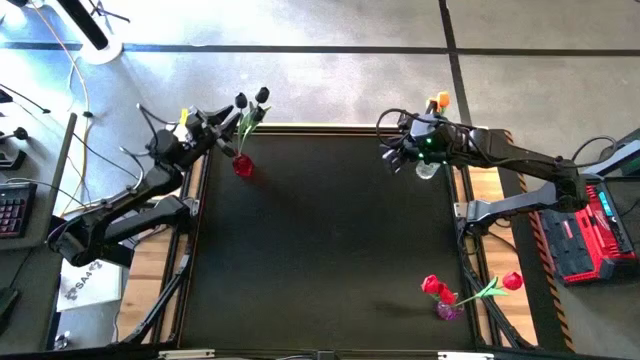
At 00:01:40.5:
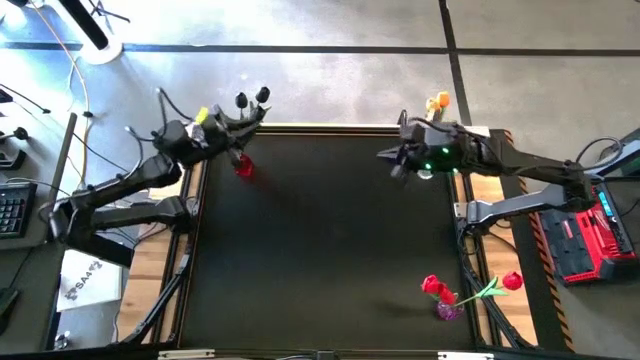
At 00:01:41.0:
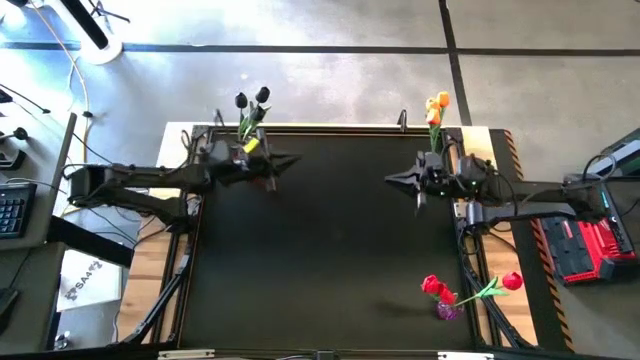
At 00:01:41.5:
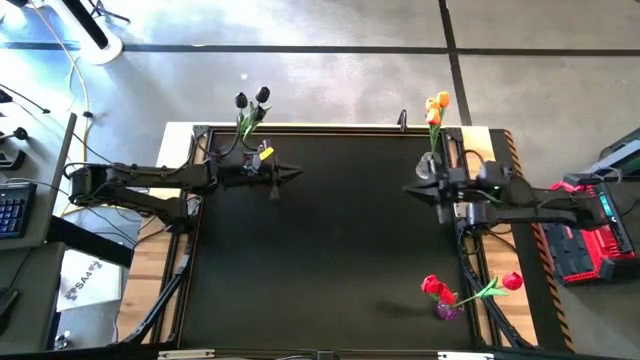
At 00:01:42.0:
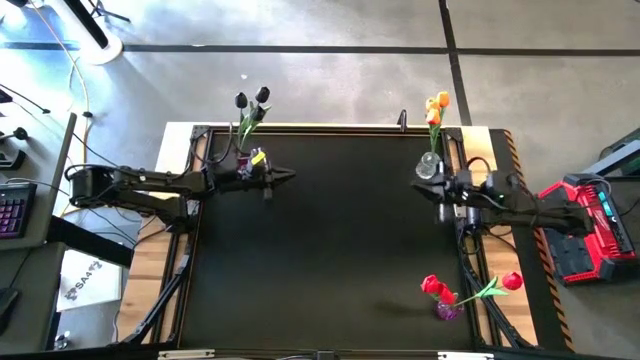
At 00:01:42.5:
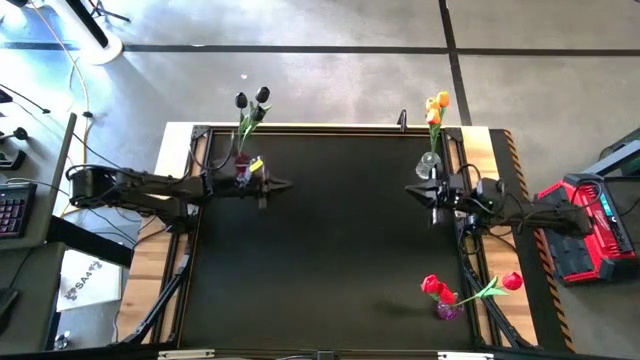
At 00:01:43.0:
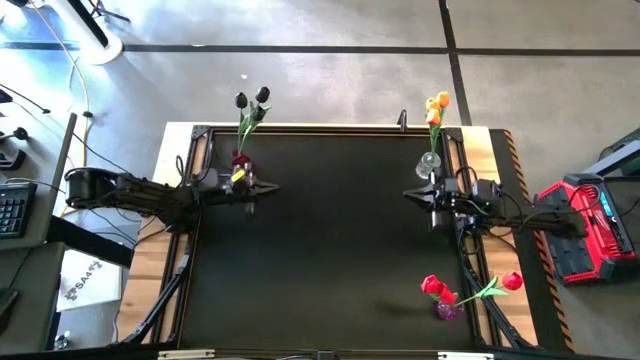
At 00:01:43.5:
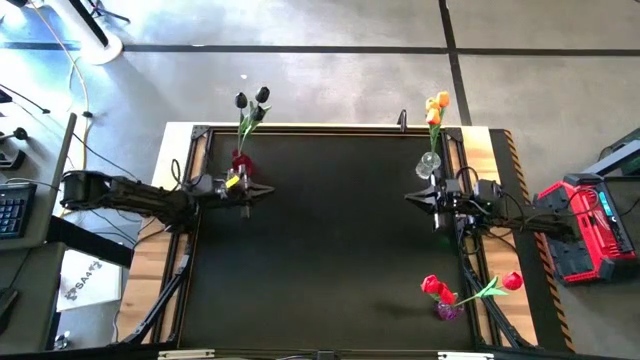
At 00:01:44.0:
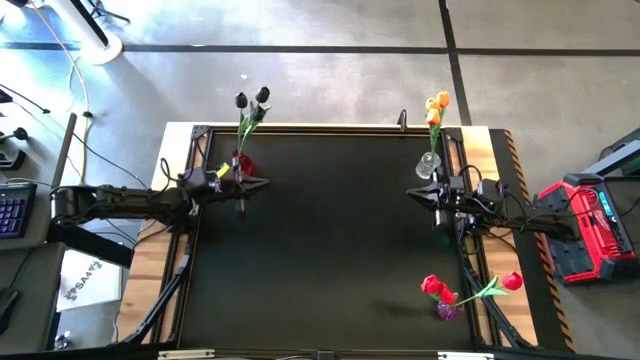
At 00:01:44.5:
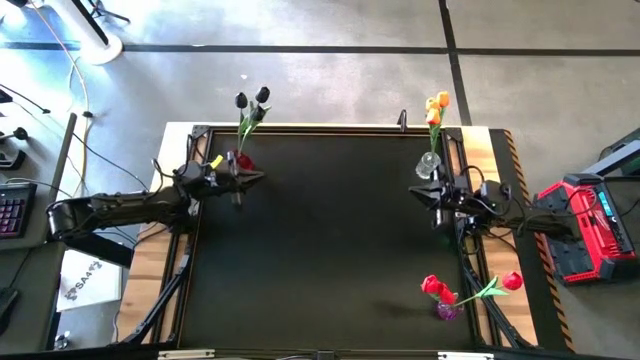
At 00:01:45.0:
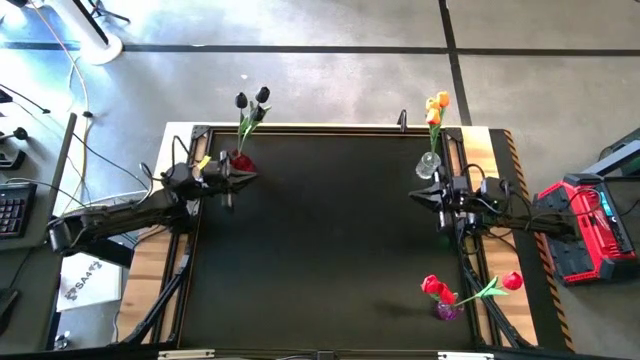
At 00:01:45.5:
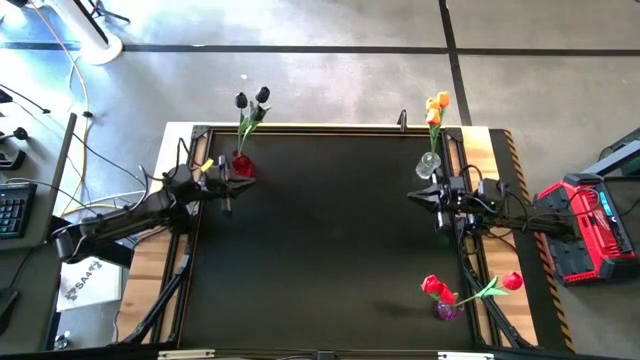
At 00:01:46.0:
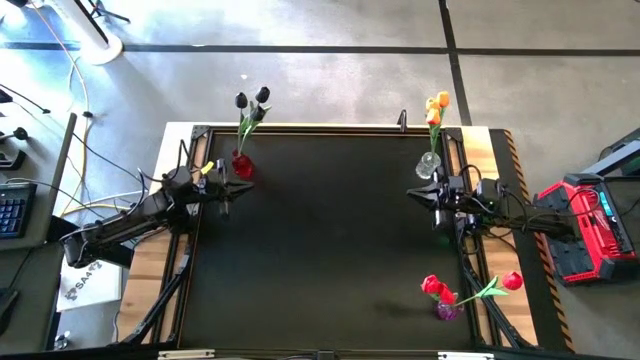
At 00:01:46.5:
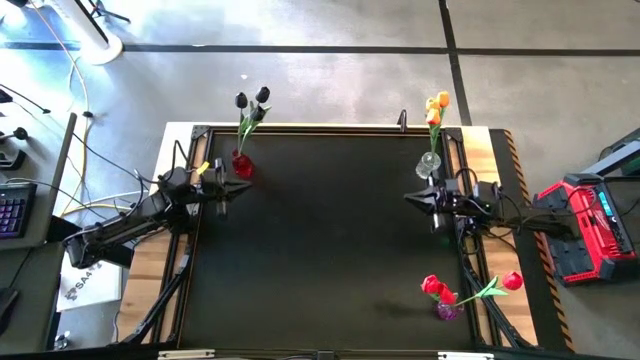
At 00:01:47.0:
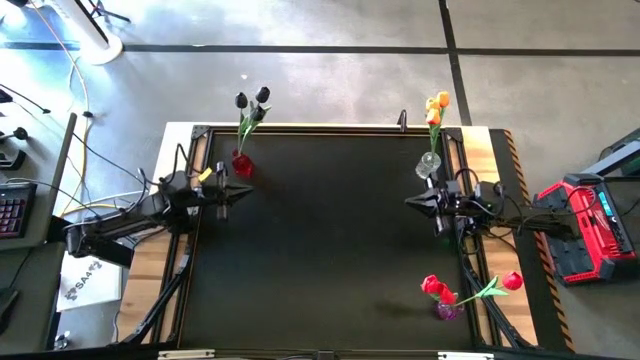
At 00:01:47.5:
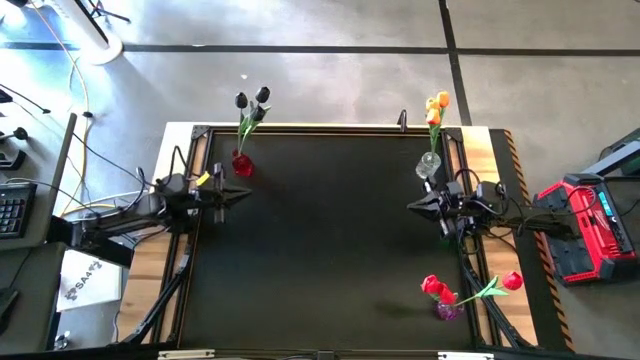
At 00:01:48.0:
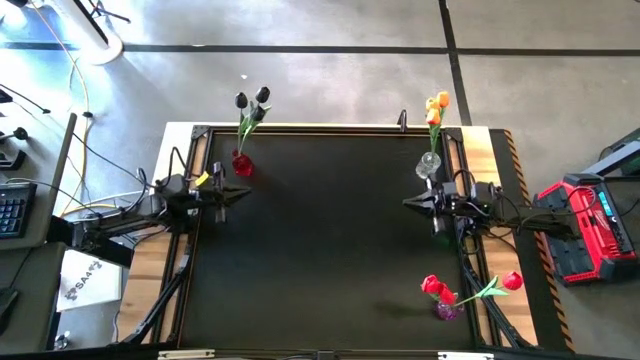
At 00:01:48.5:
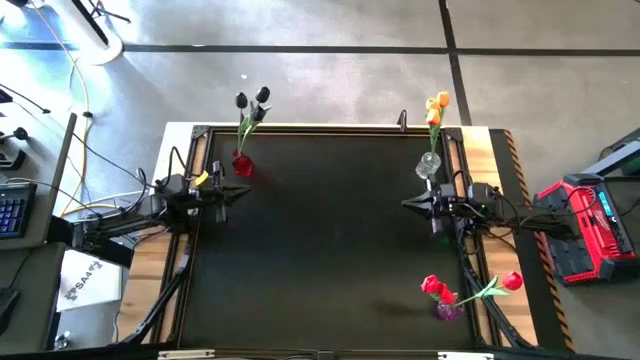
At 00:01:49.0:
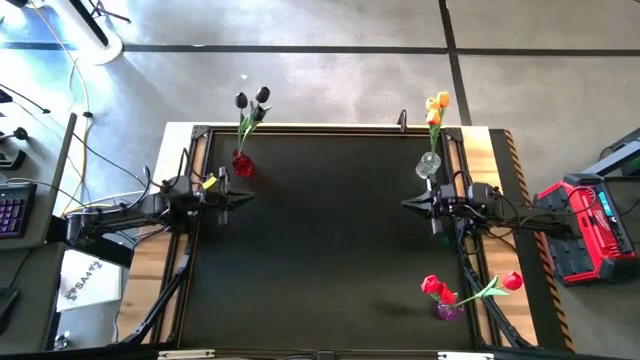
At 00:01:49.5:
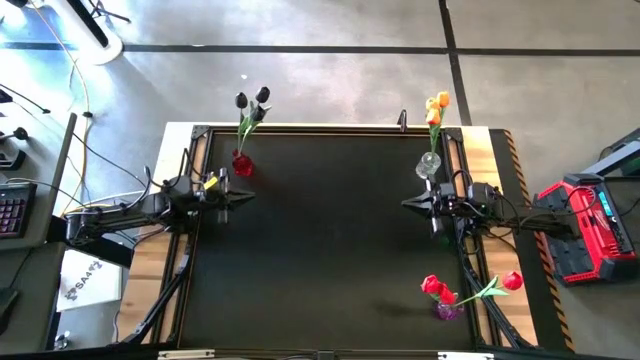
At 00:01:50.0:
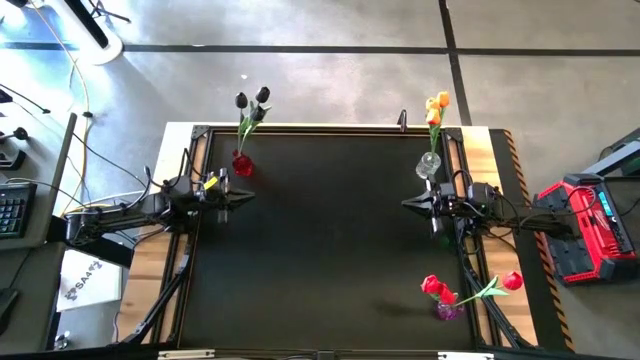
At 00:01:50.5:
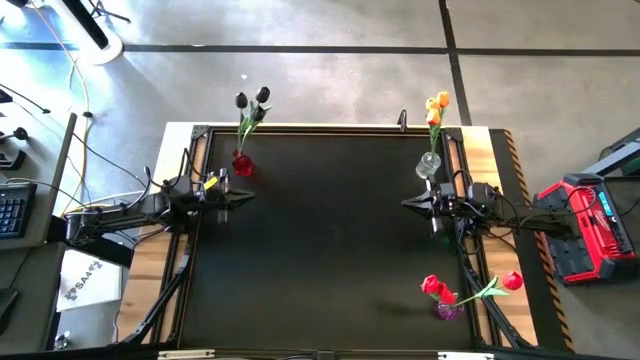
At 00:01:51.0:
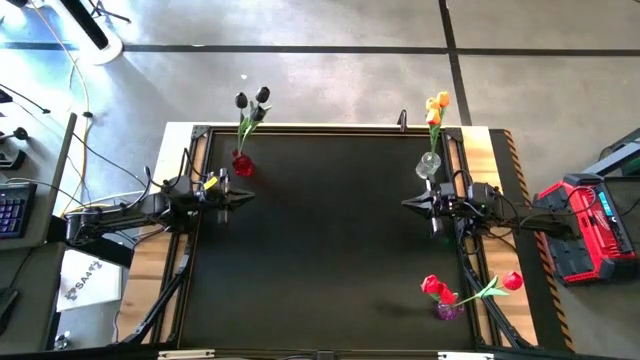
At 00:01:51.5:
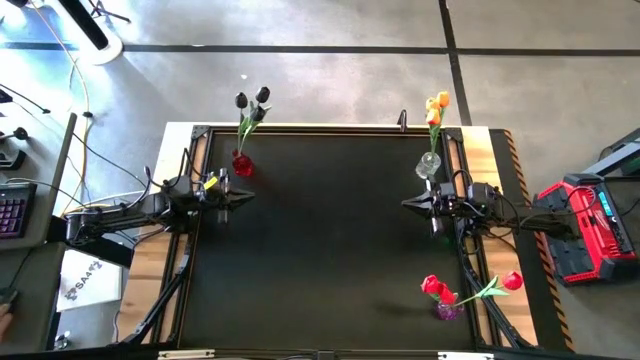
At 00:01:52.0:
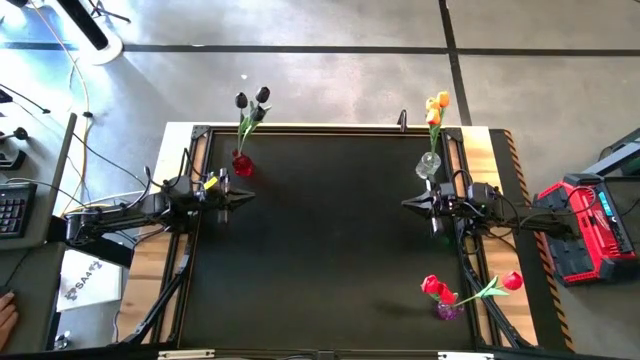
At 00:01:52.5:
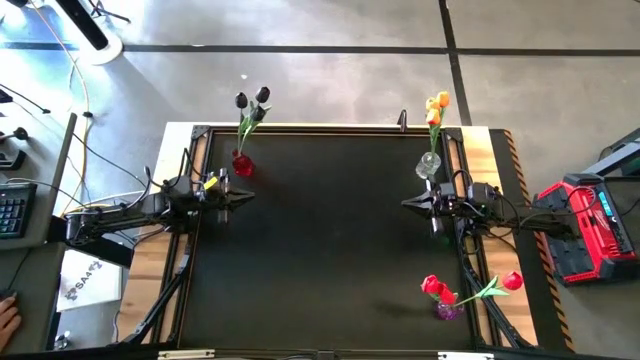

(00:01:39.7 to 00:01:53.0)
Task: Sort flowers into vase by color
Return to Home Position

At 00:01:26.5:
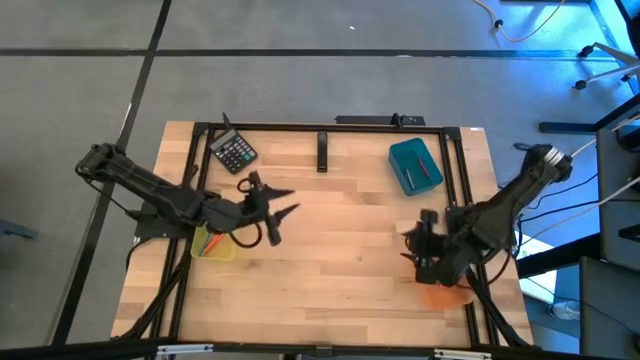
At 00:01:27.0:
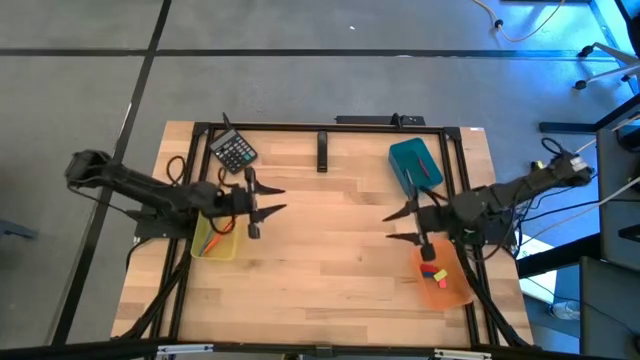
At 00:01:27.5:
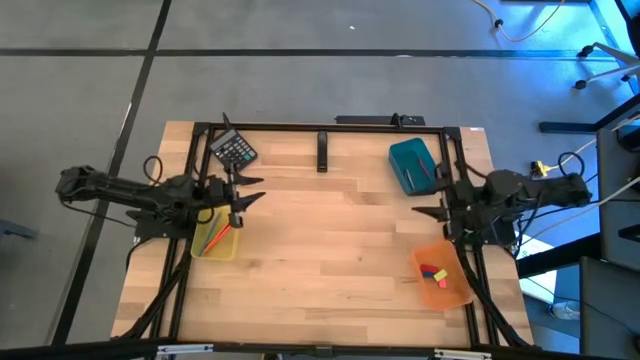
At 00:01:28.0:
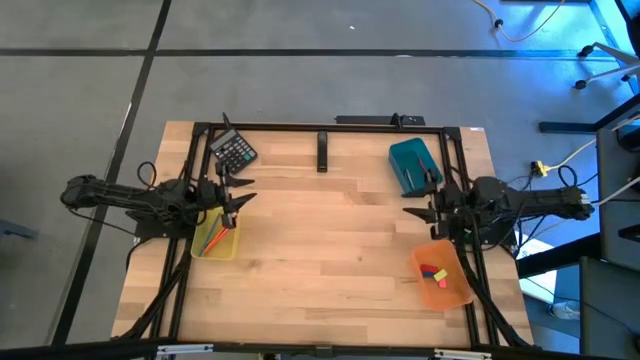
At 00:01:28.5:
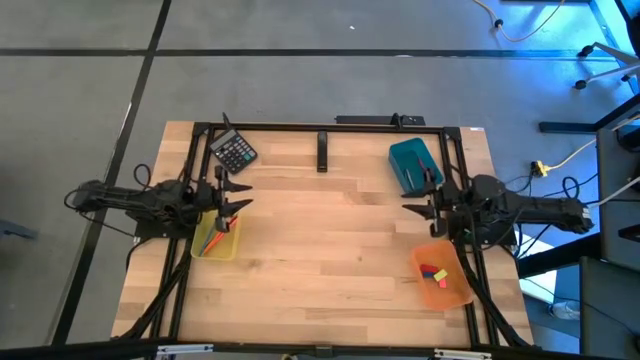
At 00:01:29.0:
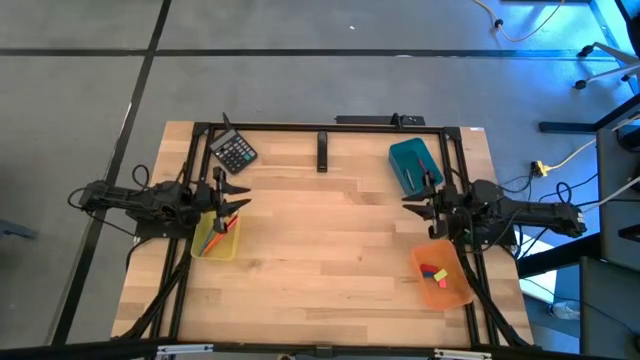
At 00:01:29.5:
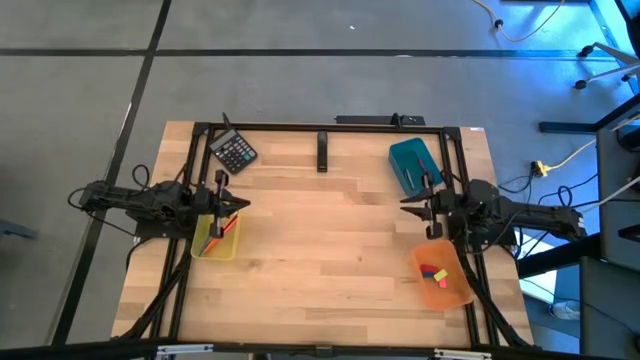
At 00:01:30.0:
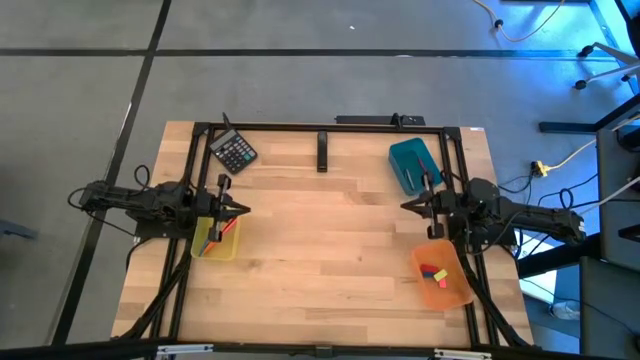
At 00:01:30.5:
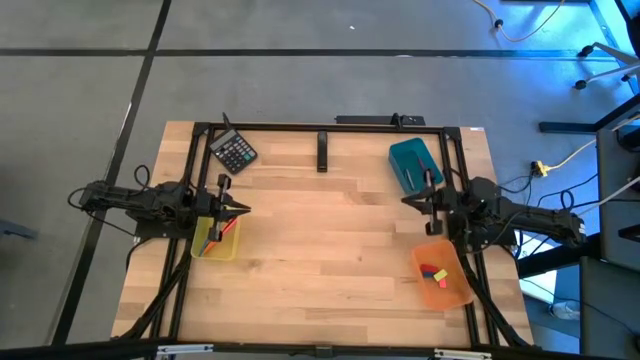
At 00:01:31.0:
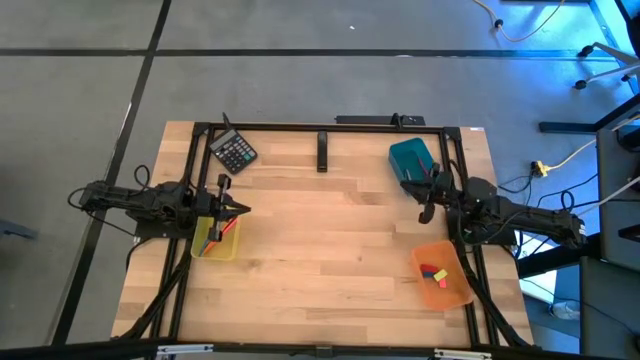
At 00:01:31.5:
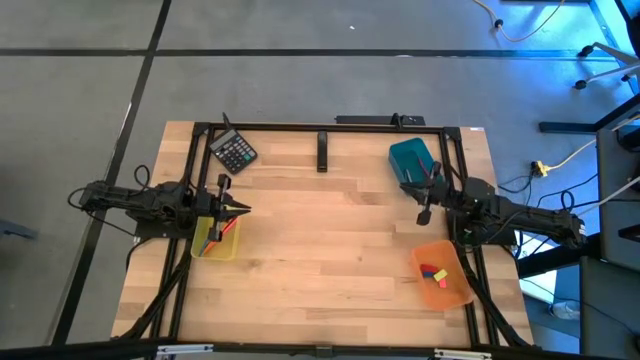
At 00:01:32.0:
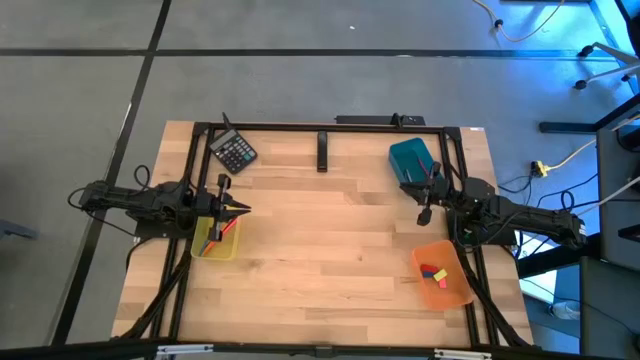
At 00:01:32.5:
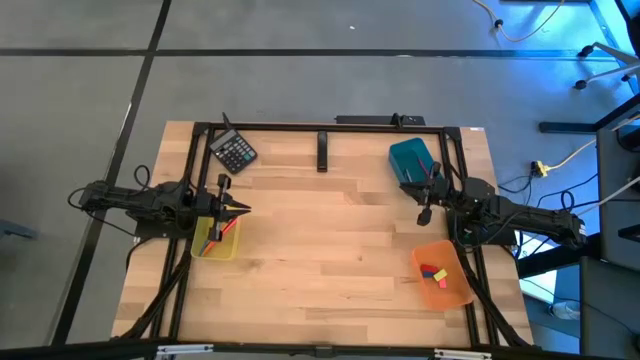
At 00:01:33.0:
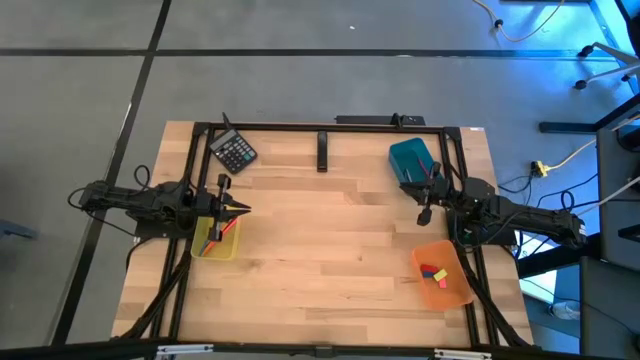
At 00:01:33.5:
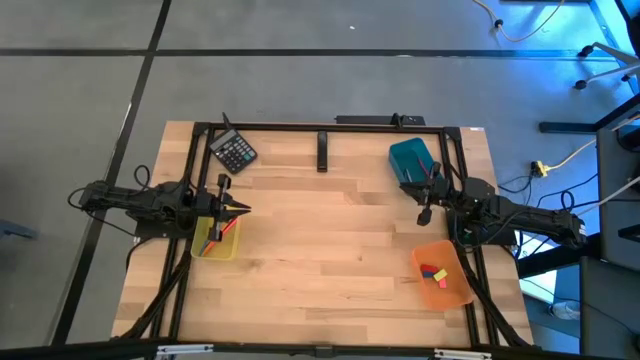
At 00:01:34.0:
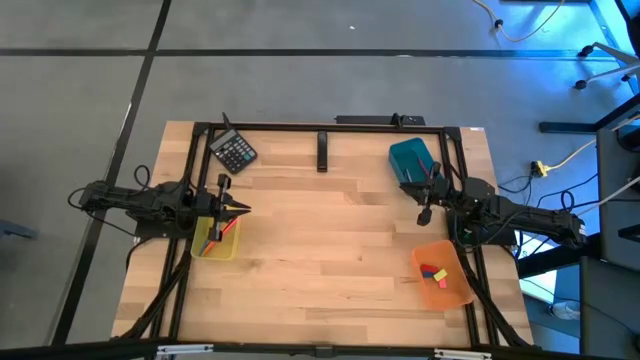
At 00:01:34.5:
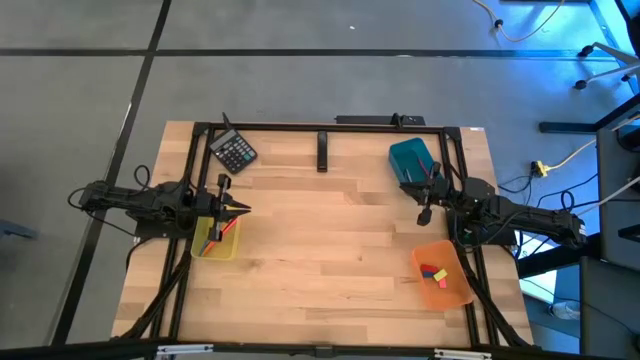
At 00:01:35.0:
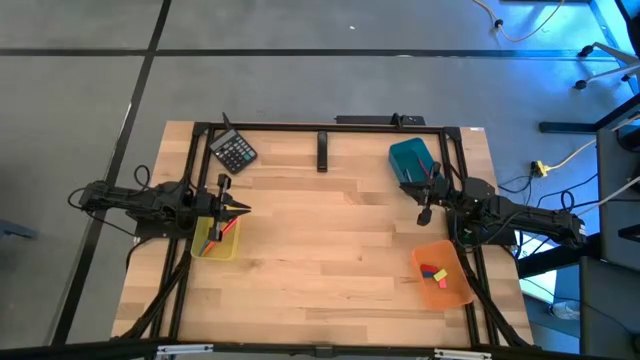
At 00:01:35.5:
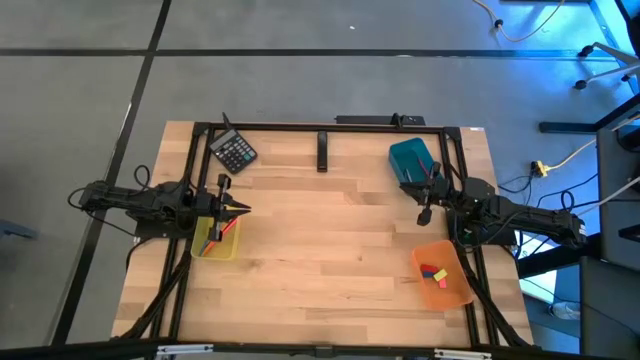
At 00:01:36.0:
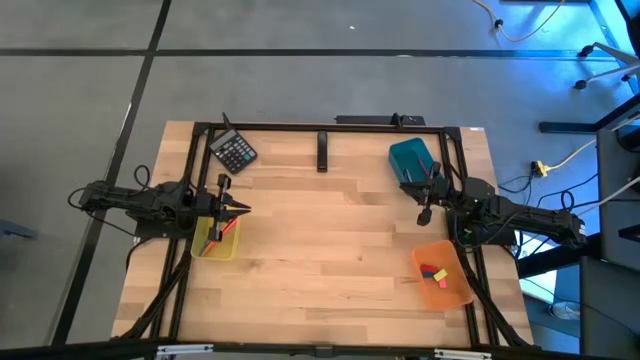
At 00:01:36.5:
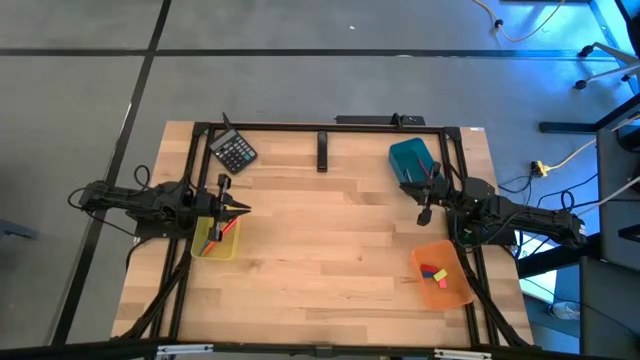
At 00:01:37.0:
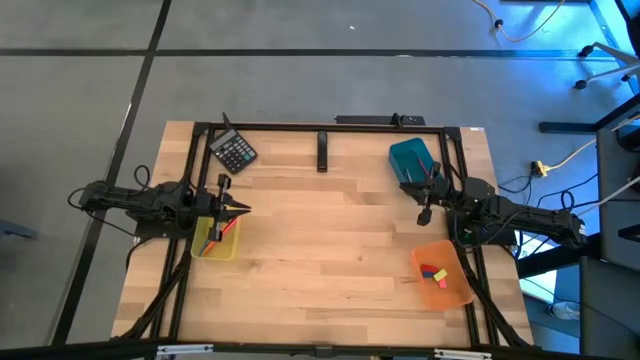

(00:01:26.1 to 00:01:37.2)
Task: Sort crayons/erasers/pens/pencils in bins
Return to Home Position
